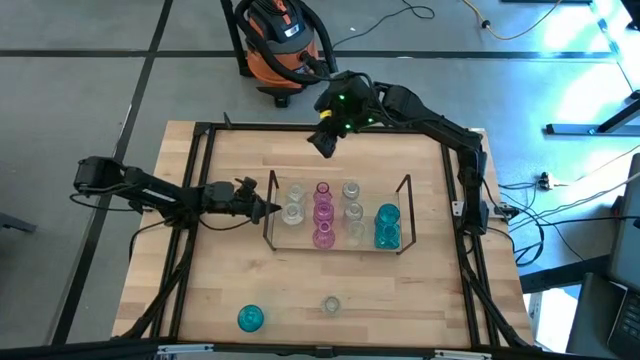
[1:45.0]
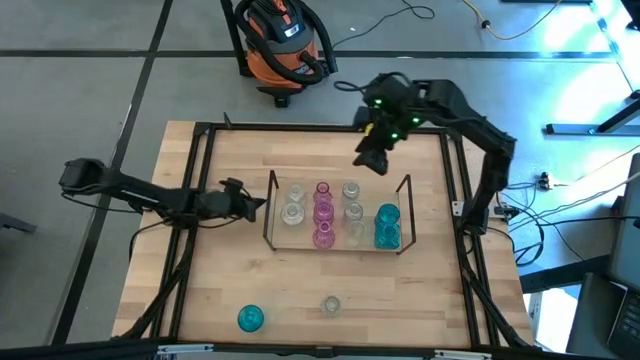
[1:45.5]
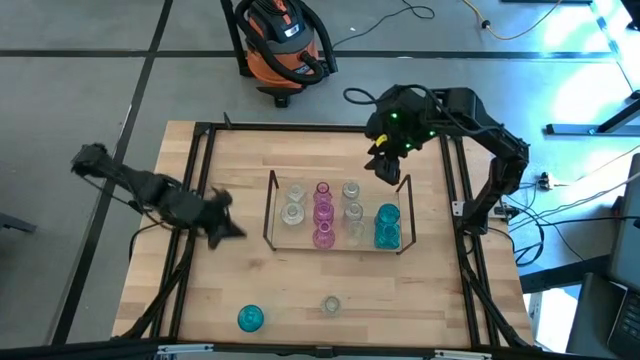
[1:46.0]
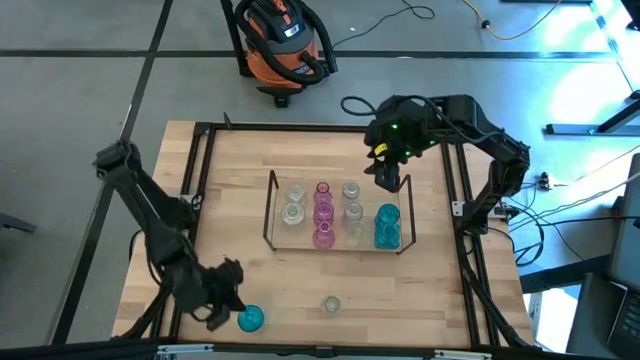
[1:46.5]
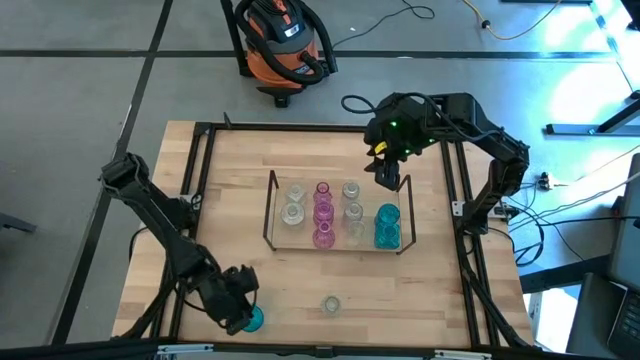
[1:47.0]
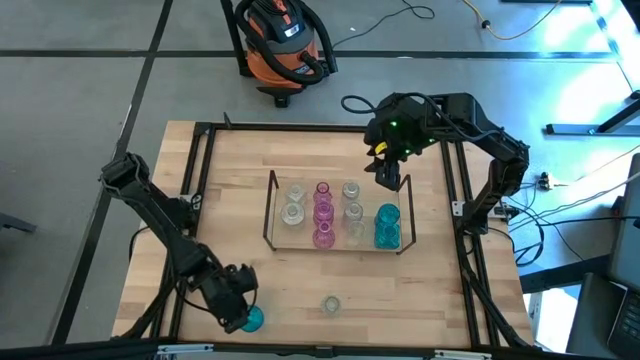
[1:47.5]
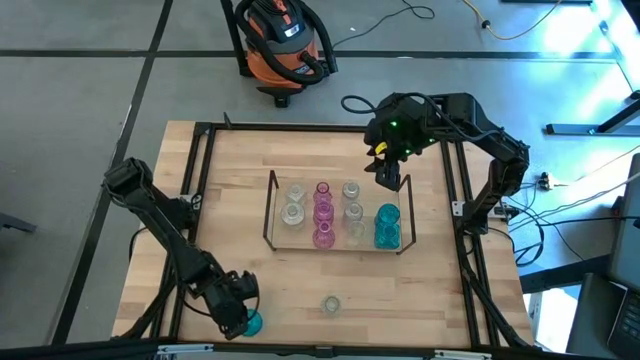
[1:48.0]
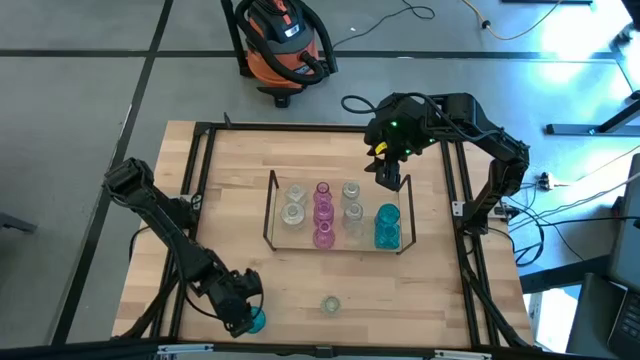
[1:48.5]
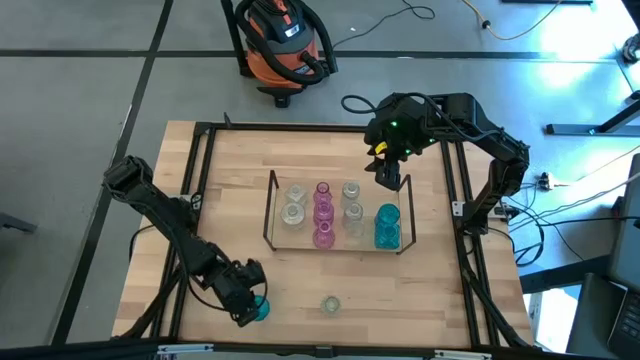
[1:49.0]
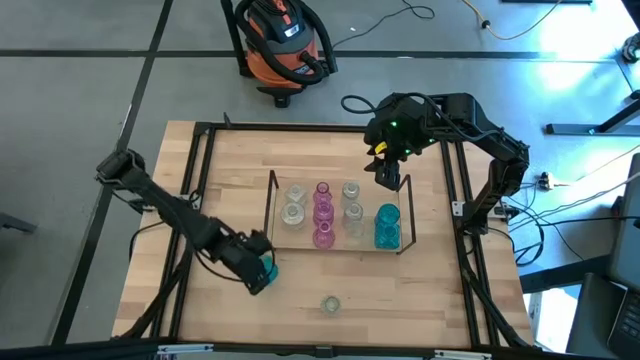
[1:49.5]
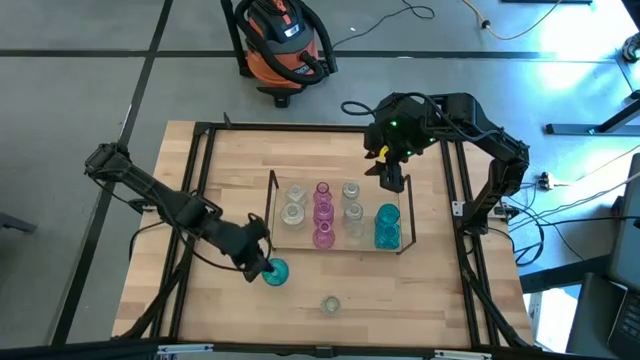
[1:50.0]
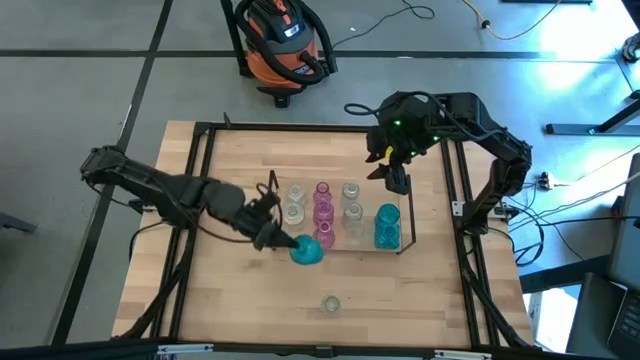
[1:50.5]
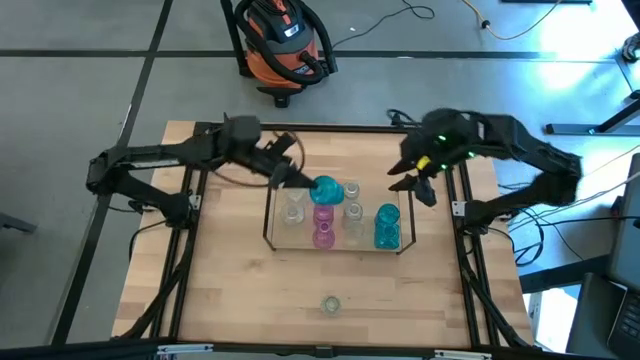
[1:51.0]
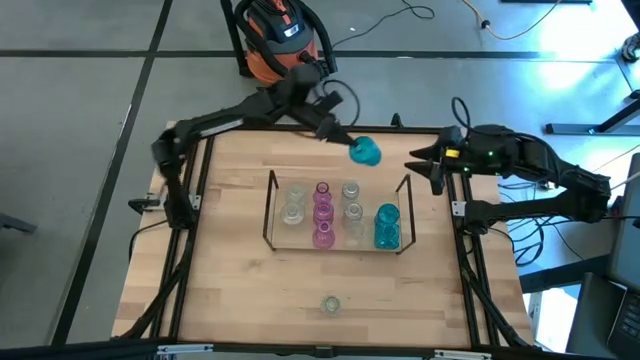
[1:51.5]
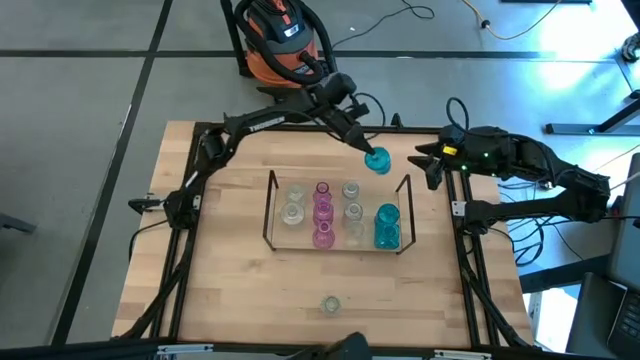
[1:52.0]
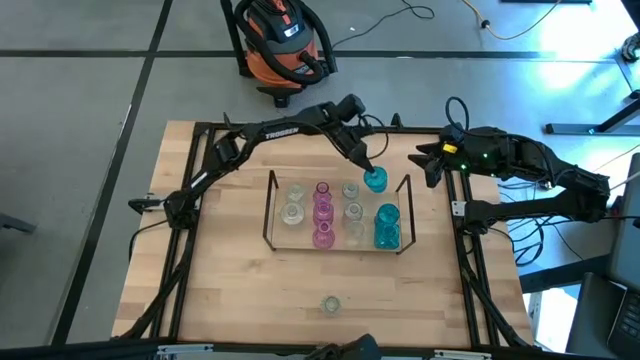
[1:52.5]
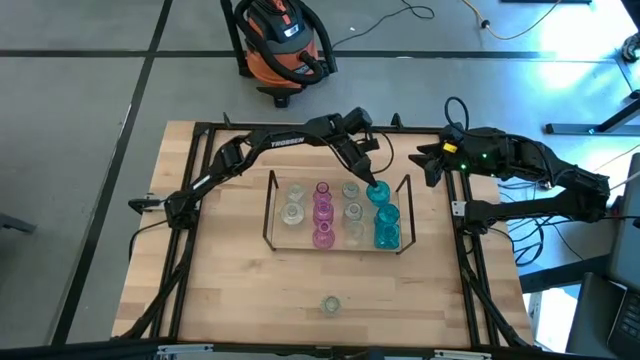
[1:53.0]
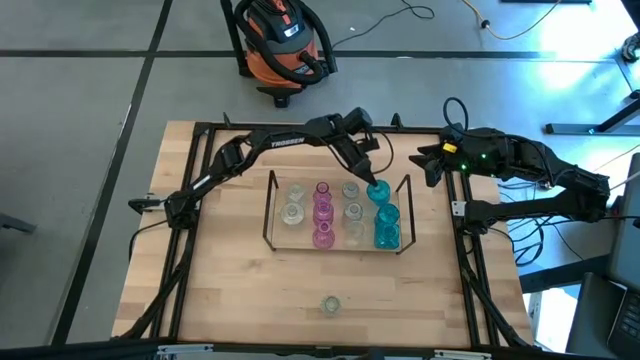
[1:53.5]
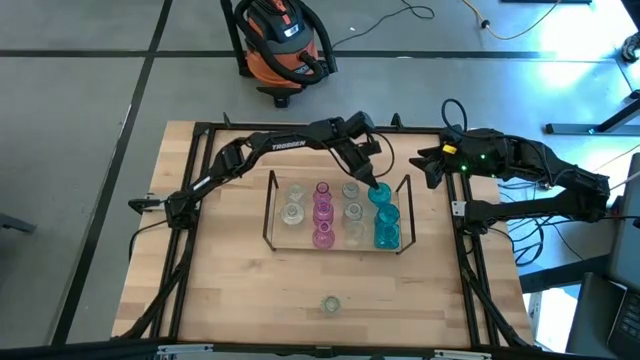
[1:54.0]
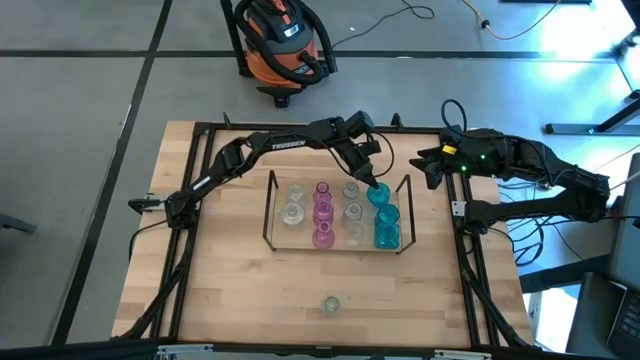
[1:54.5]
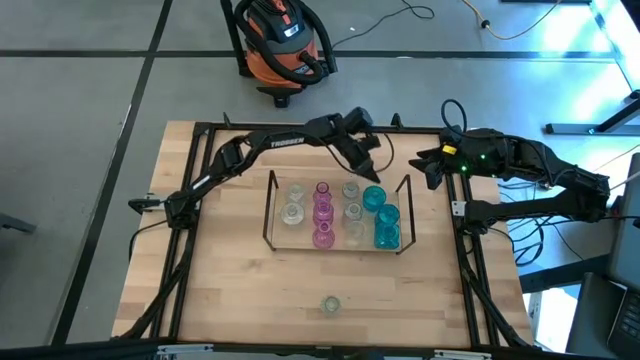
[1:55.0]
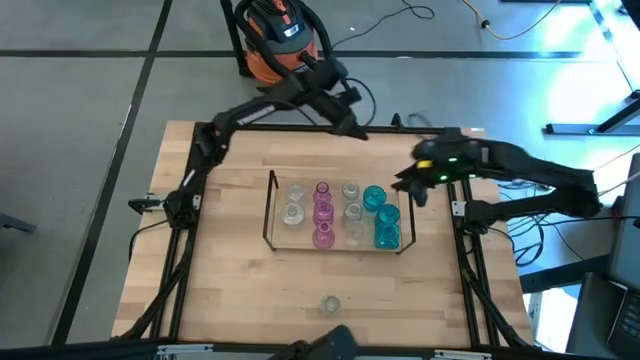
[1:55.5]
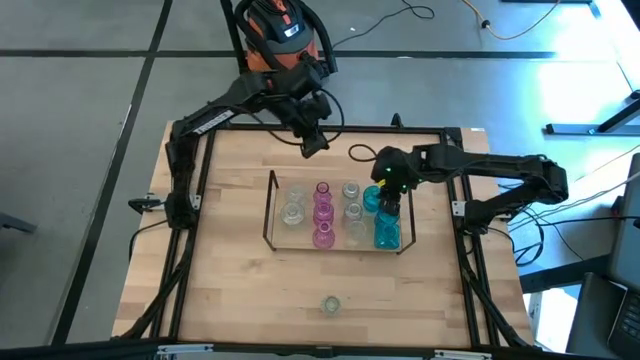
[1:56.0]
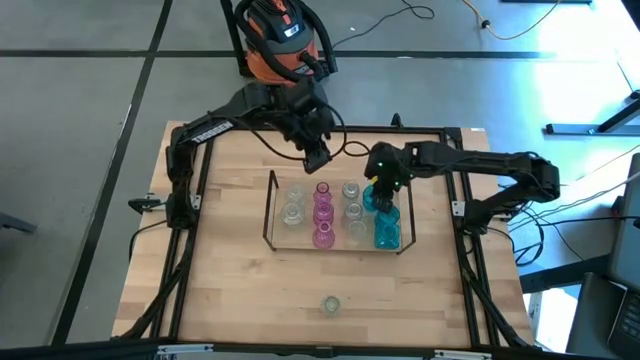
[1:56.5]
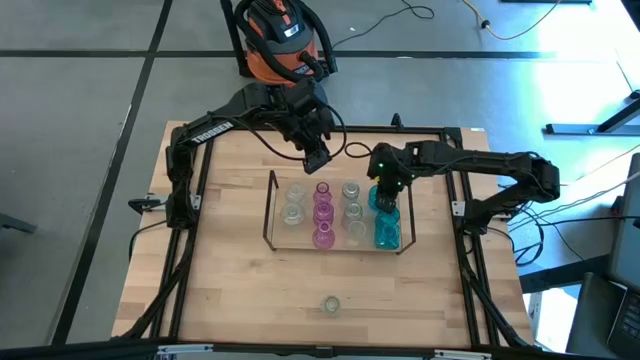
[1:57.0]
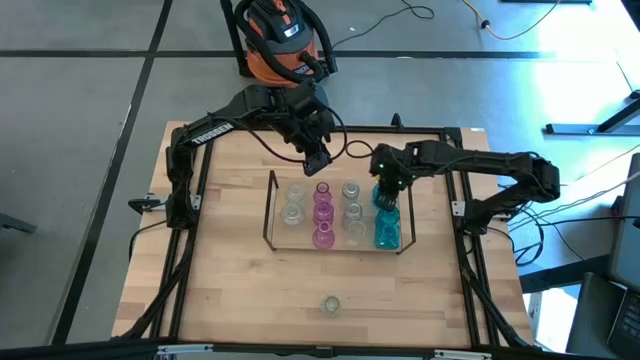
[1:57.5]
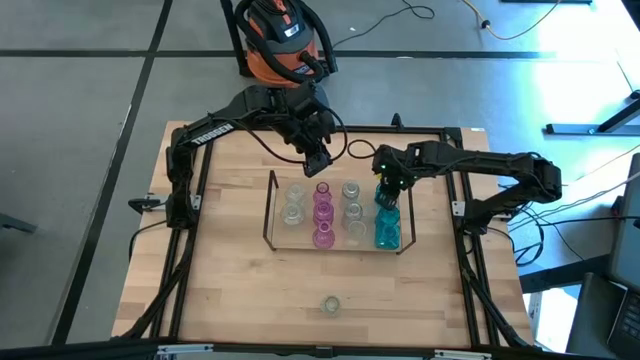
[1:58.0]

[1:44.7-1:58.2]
Task: sort vases onto shelf
Put the blue vase aligned with the other blue vase on the shelf

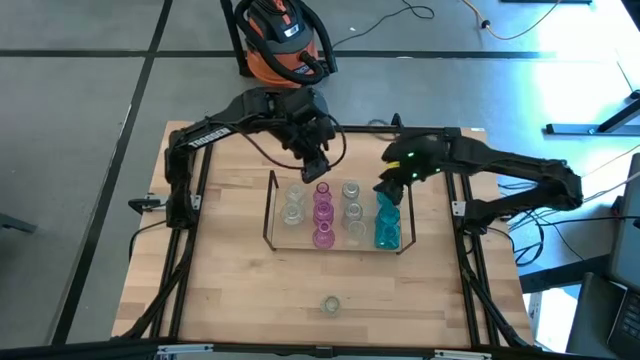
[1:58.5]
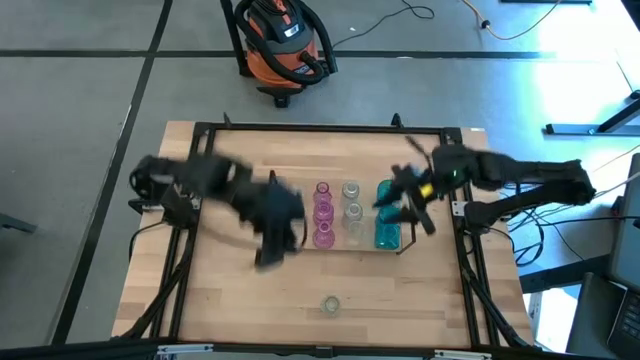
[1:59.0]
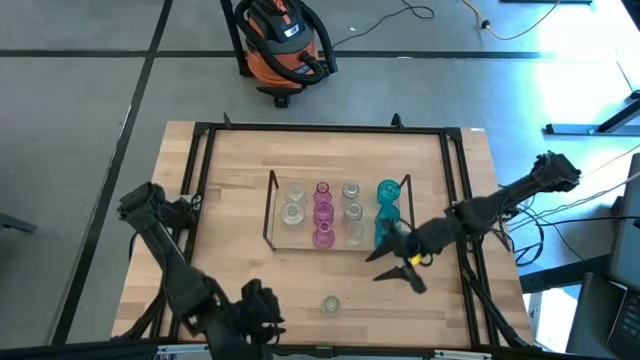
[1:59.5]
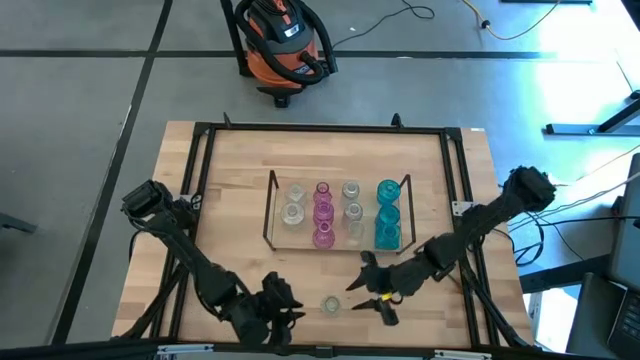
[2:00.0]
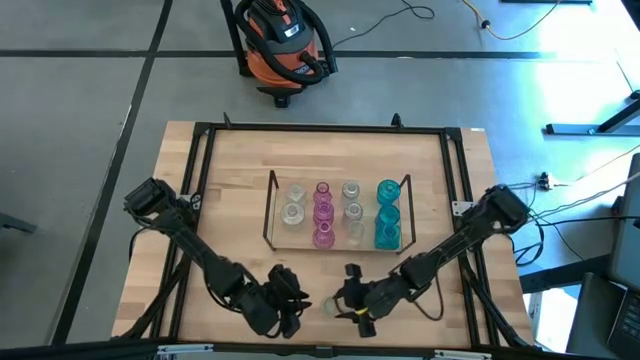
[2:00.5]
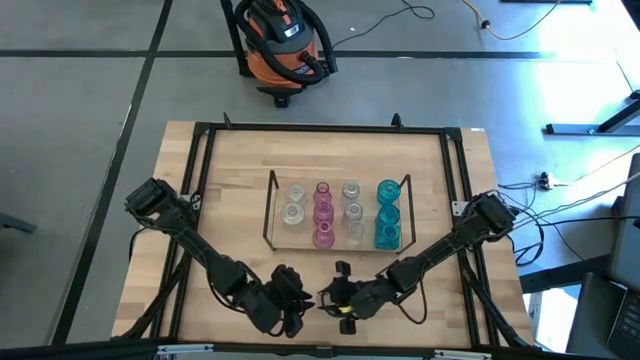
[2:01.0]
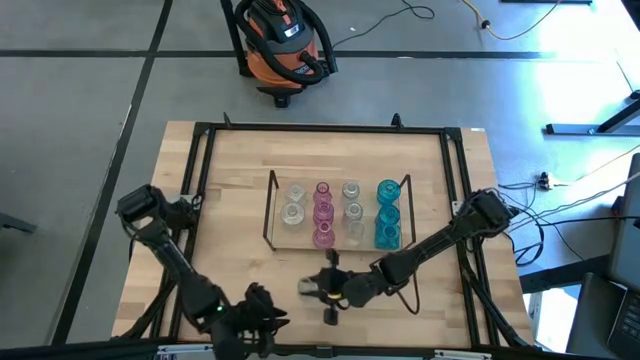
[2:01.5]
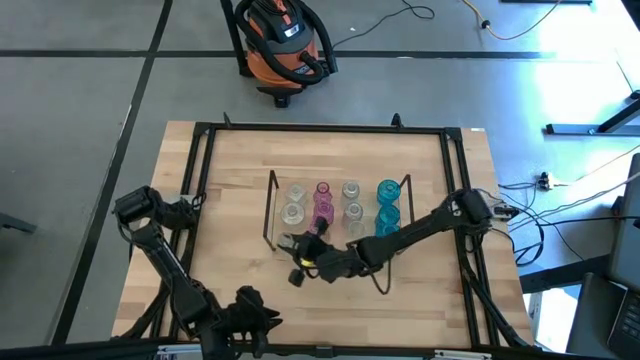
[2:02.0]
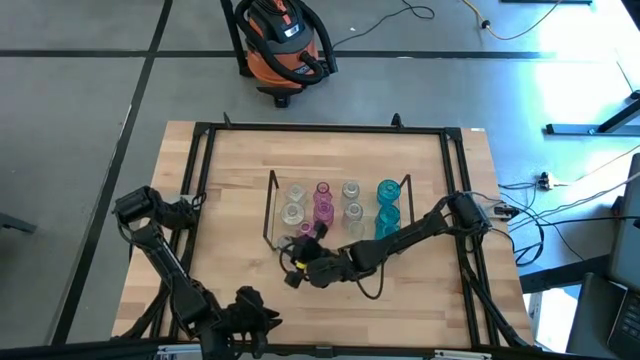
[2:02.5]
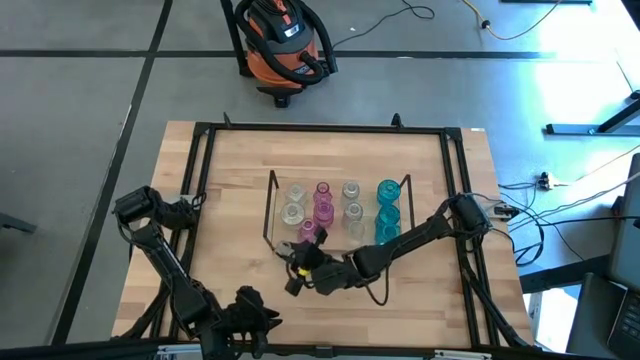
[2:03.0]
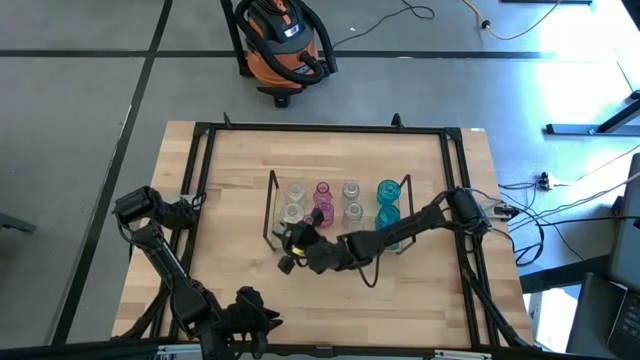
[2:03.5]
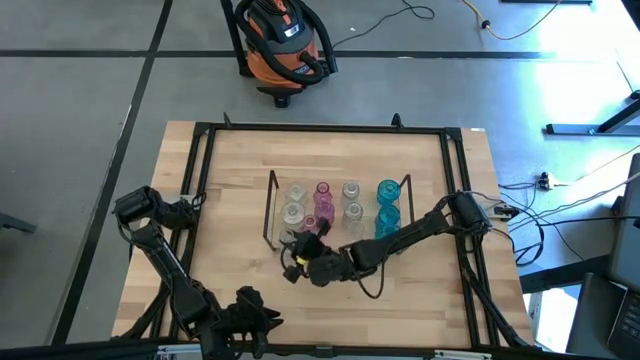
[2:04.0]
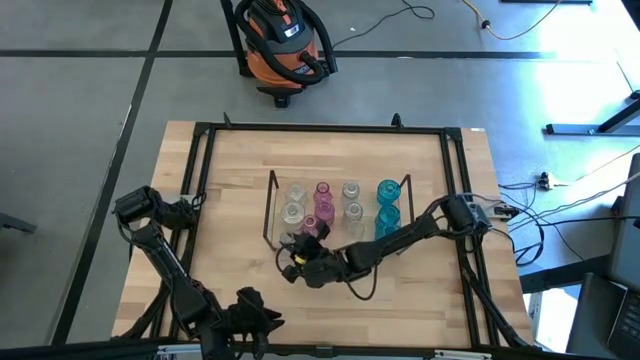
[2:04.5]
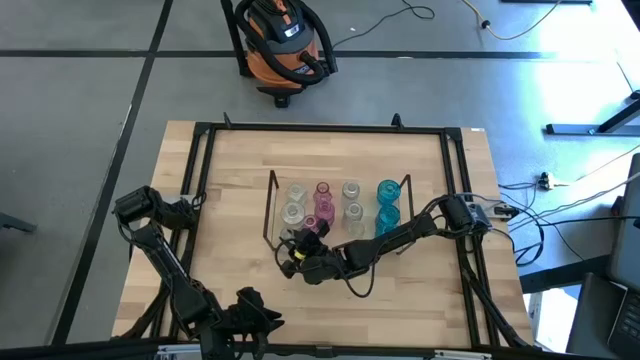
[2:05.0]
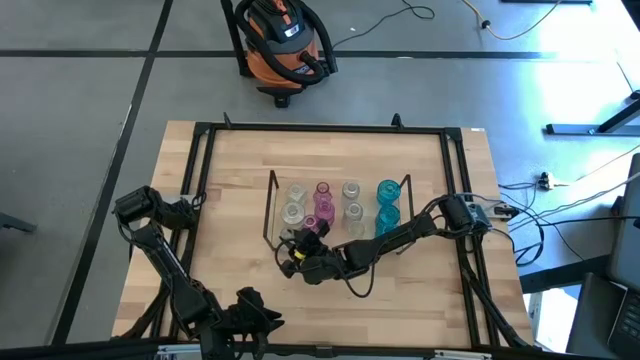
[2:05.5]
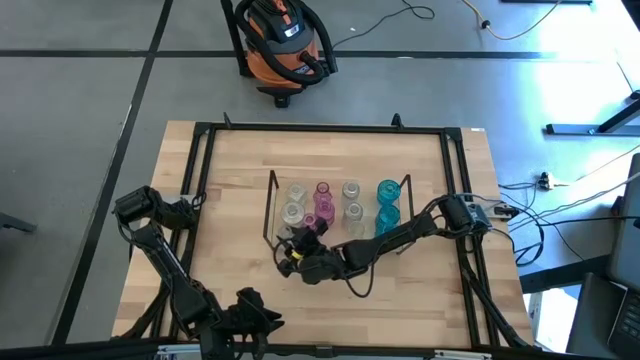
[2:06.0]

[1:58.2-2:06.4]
Put the transparent vase aligned with the other transparent vase on the left side of the shelf

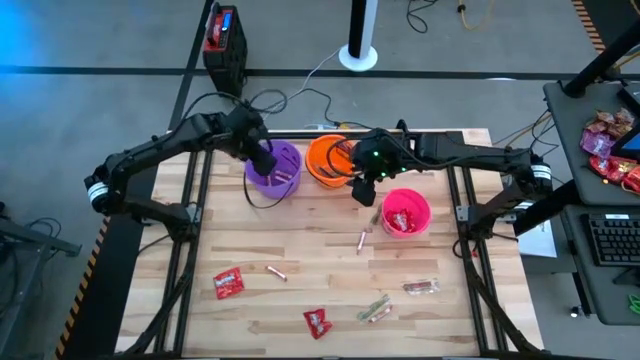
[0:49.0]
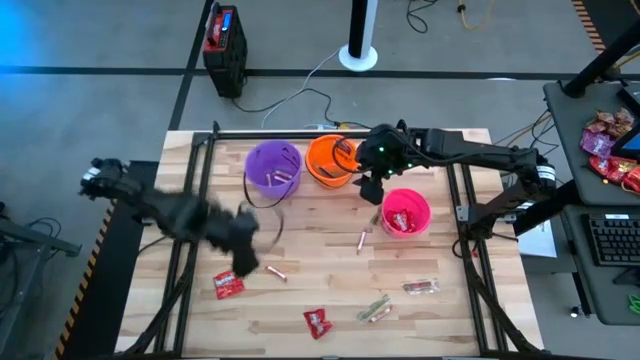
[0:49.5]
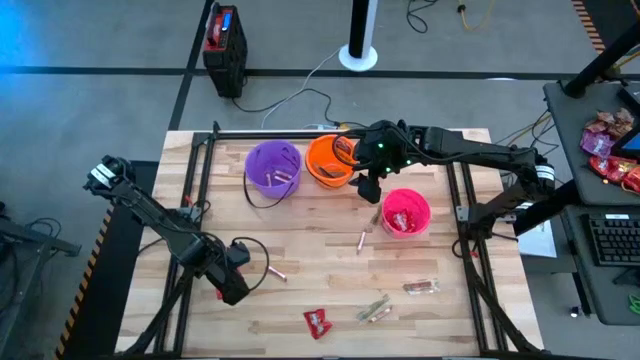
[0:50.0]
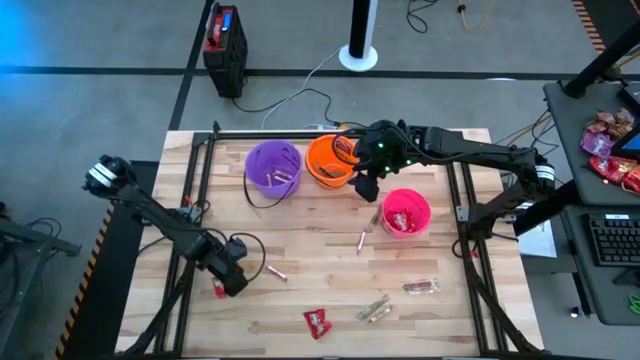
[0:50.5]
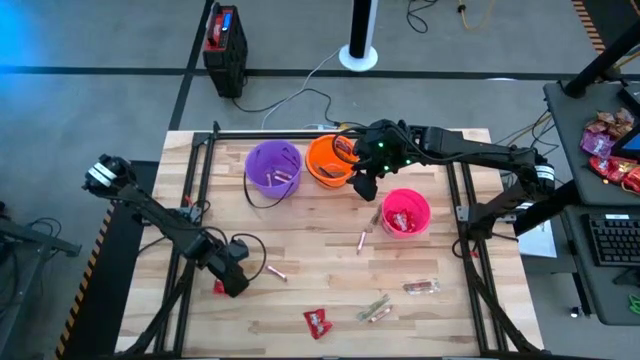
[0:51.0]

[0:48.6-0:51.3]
Task: Sort candy by brand, put in halloween buckets
Put the red candy into the pink bucket
